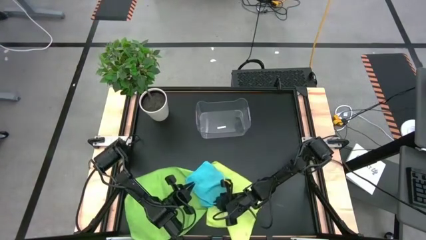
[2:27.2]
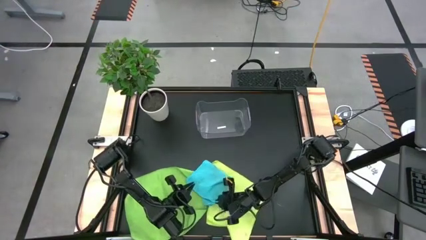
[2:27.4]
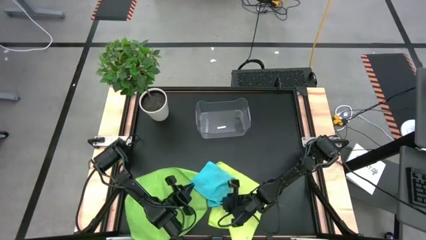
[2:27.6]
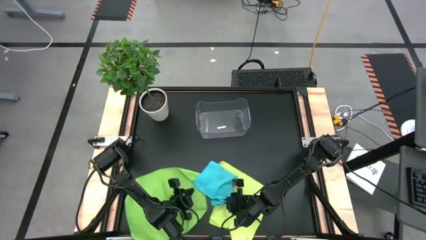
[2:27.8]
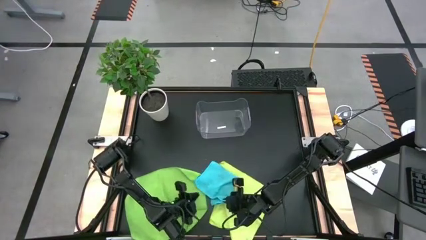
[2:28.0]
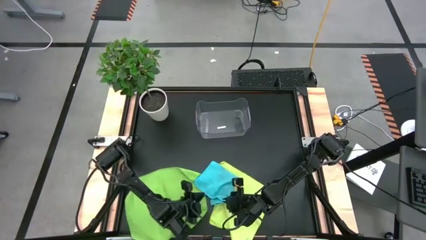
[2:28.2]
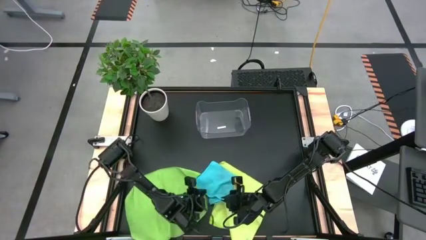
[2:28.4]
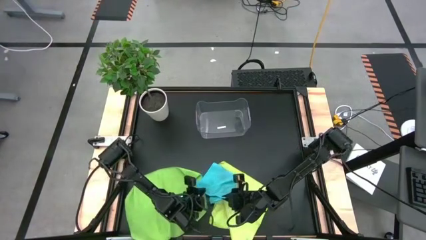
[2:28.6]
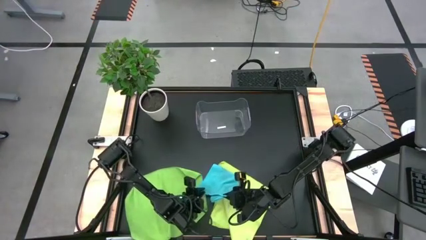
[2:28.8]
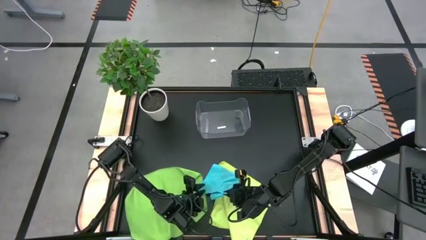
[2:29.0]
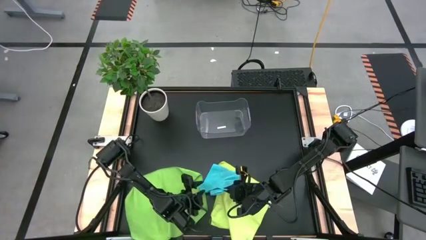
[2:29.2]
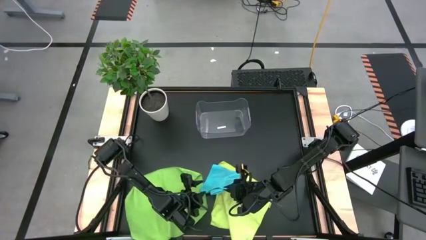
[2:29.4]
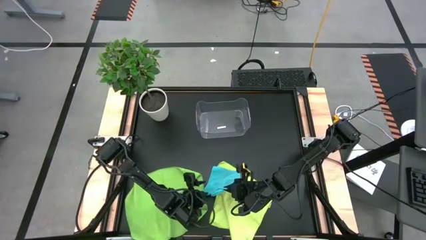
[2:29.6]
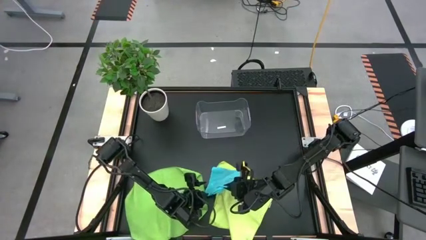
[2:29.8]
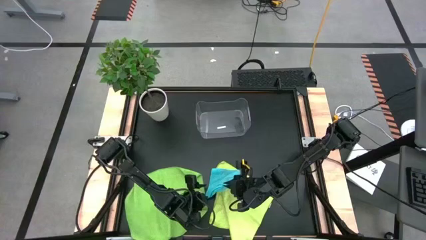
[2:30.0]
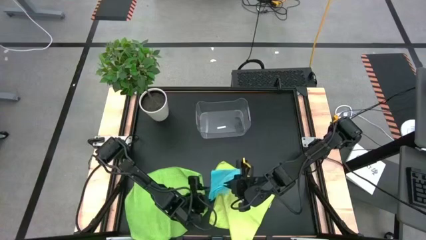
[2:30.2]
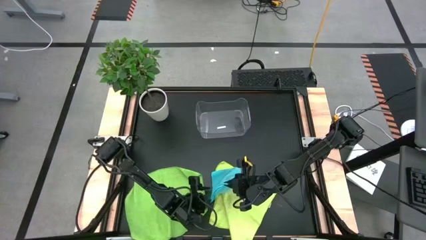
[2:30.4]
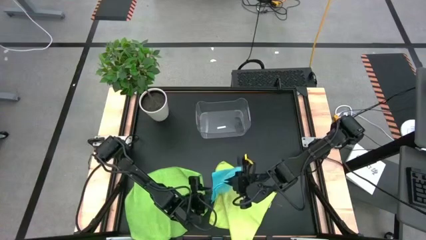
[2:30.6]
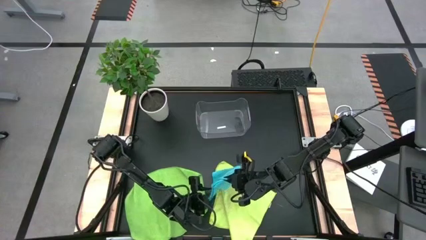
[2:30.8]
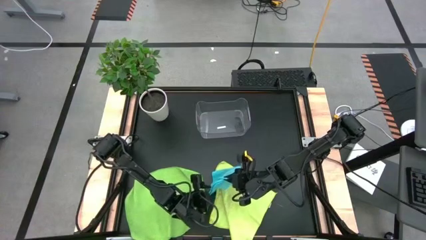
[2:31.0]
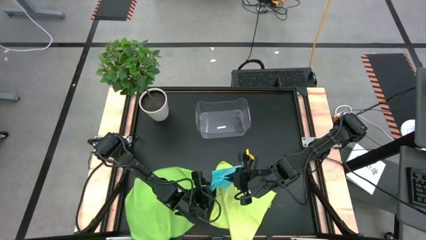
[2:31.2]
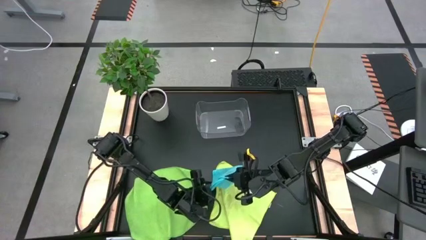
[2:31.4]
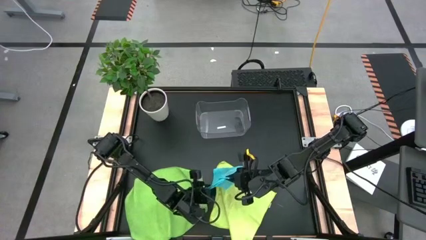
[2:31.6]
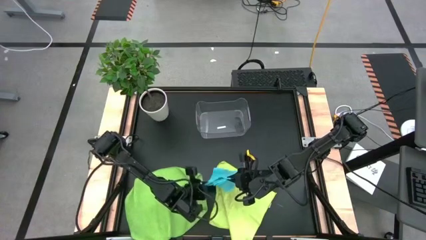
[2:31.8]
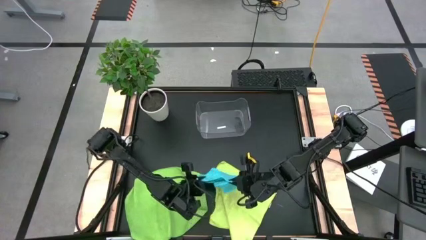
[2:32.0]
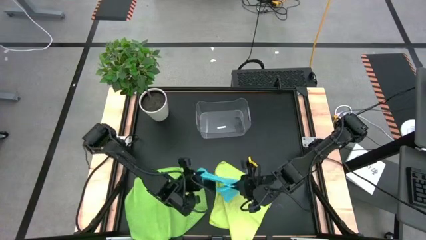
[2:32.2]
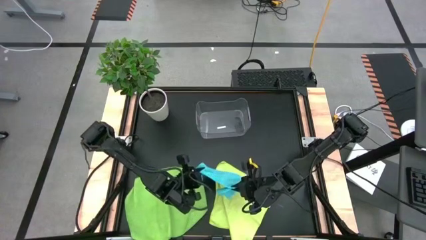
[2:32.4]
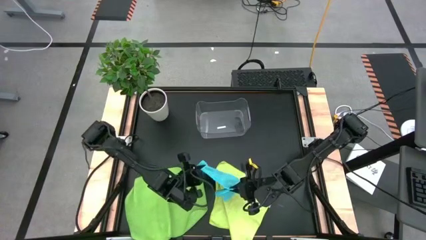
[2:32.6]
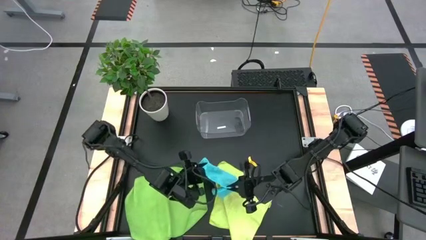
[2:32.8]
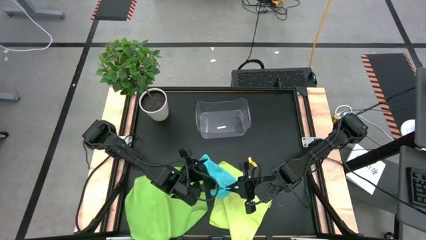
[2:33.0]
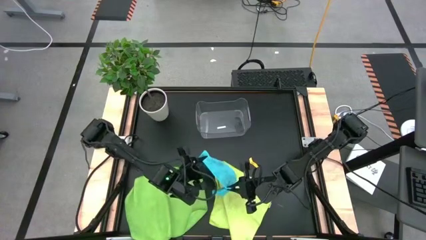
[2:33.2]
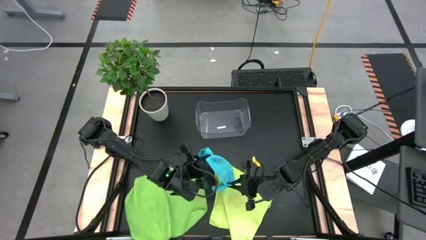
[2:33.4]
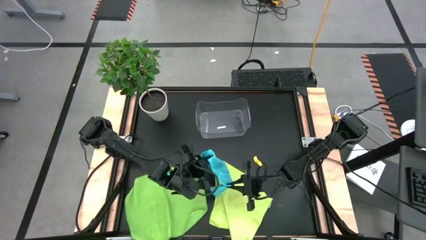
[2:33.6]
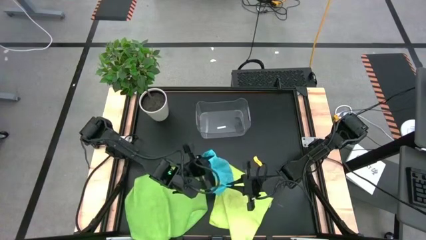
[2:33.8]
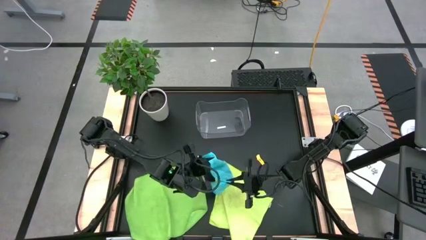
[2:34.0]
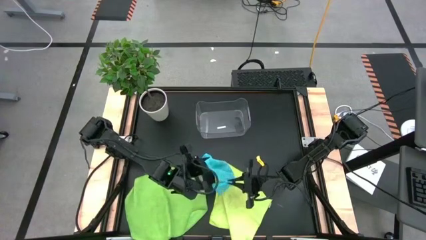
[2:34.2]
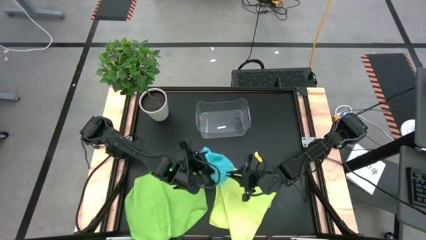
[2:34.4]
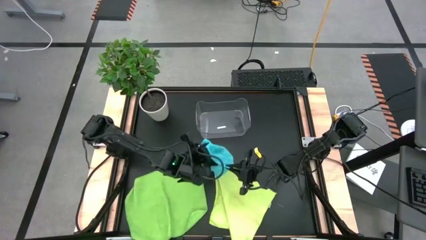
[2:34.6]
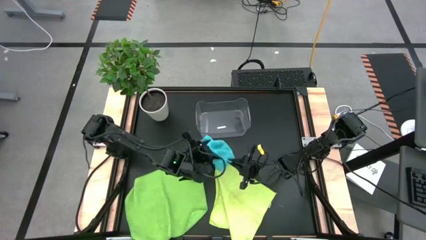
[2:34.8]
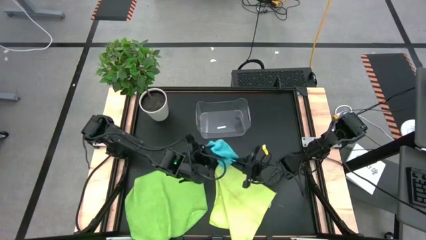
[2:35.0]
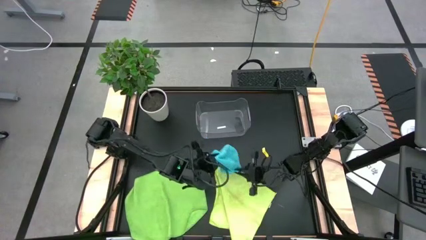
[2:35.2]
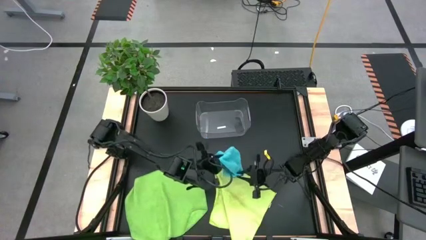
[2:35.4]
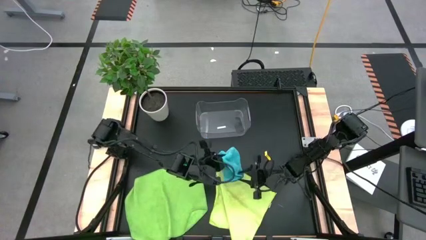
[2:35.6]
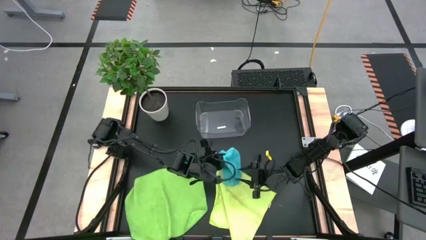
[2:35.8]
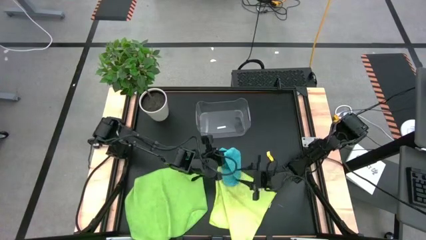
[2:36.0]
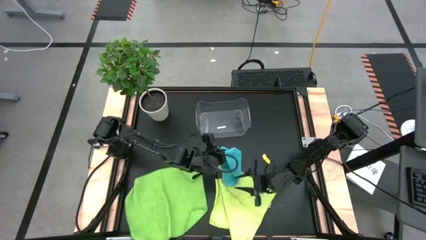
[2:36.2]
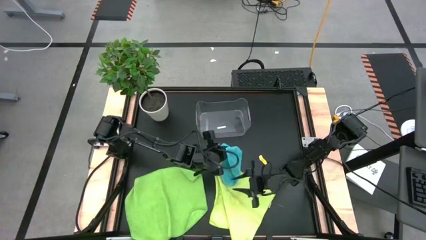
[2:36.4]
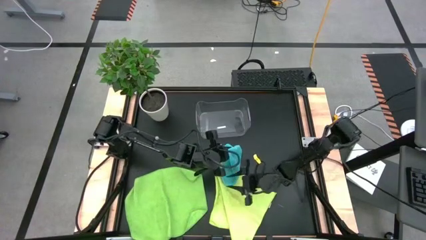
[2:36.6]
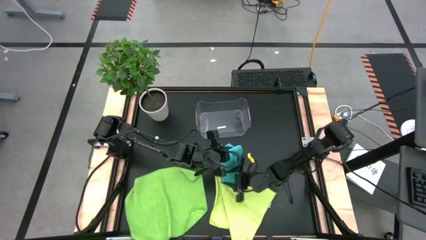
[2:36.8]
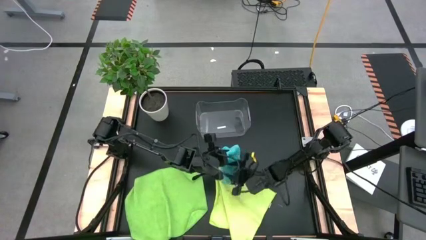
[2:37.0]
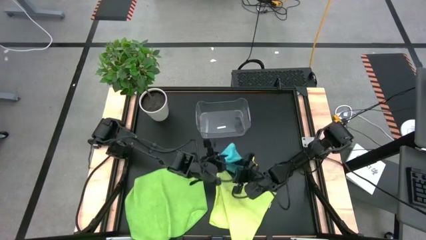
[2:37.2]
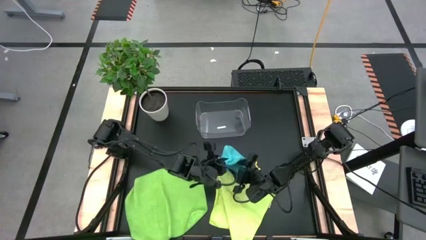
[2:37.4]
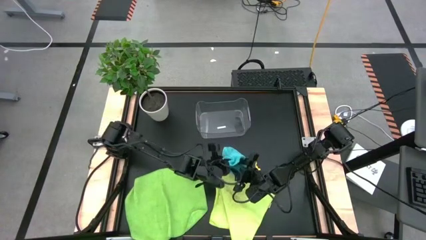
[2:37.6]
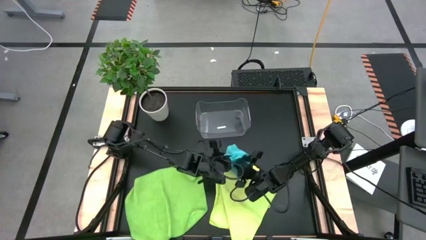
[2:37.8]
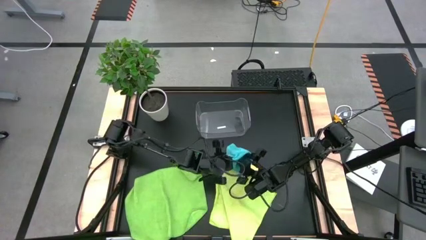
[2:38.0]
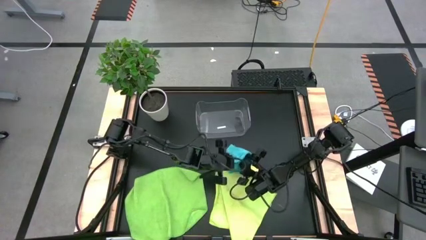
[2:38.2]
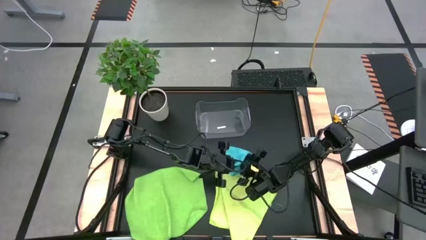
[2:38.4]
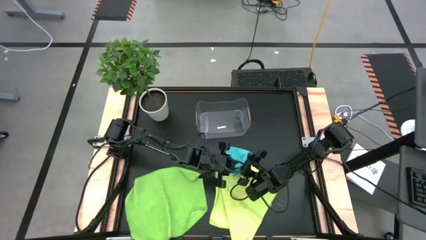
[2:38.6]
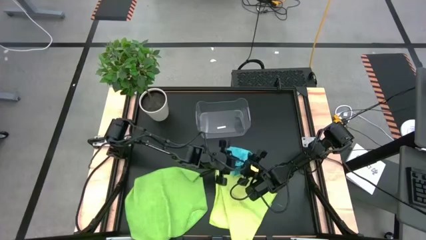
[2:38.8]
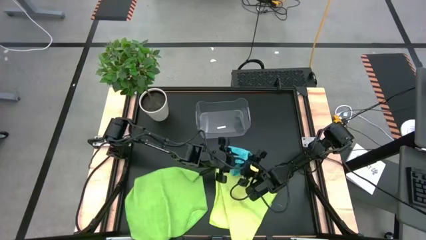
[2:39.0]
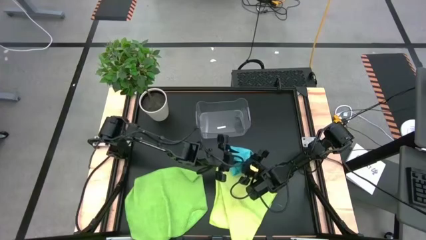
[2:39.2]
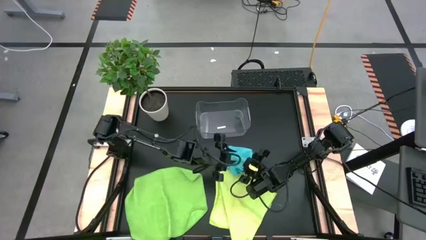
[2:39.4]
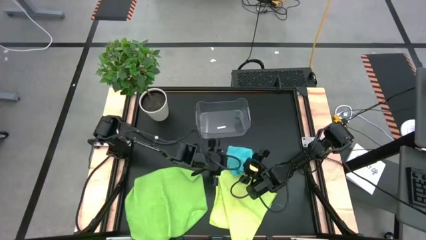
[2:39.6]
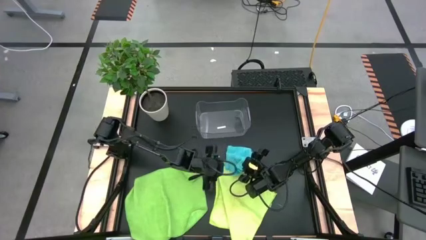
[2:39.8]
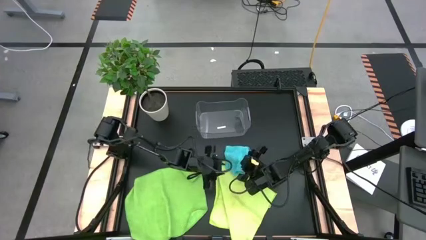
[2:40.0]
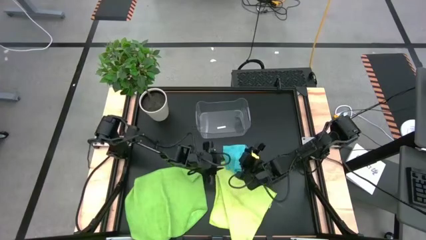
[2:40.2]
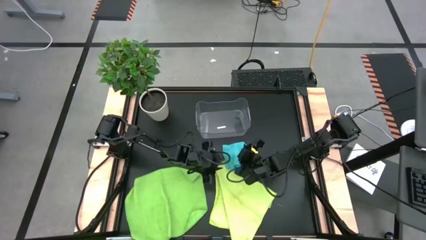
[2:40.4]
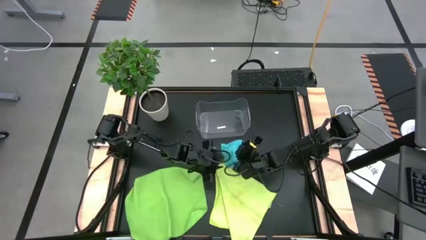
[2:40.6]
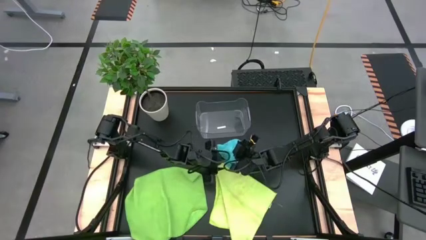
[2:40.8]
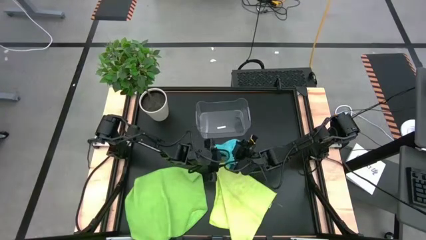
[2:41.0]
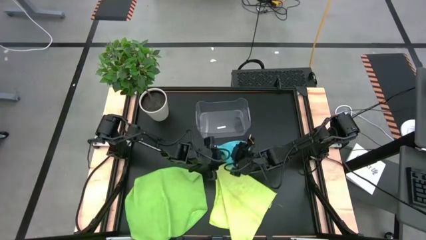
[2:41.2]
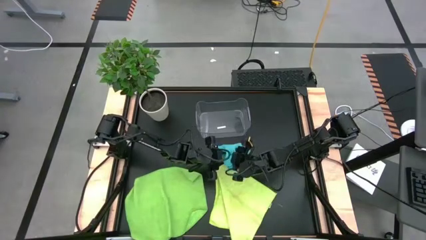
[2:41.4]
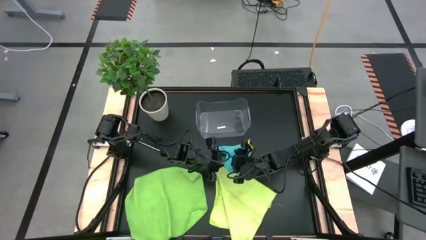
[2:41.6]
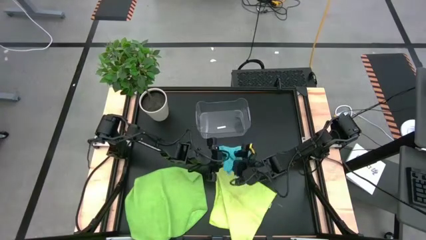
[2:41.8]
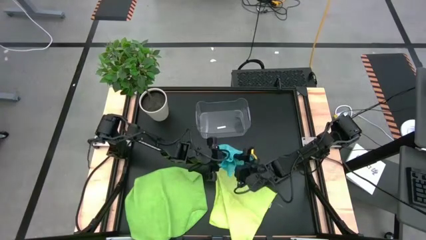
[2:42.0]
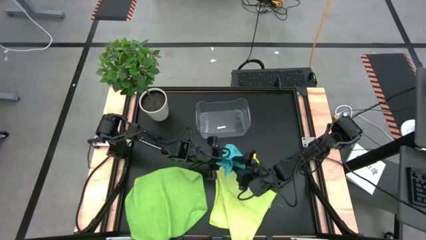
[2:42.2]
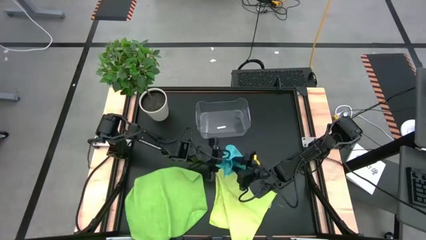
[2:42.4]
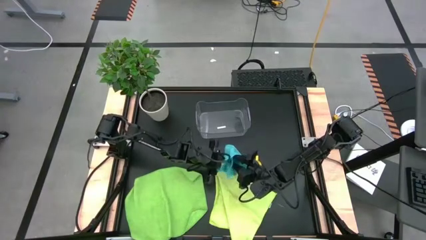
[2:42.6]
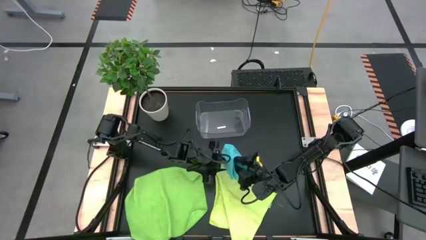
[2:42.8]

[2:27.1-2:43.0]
Task: Fold microfiber towels
Fold the blue towel

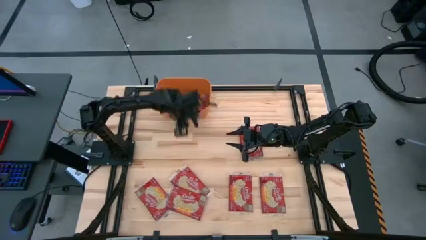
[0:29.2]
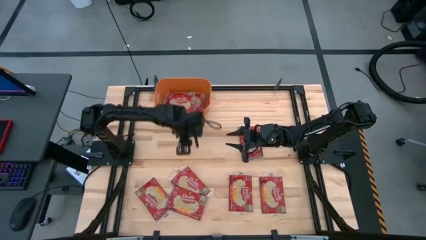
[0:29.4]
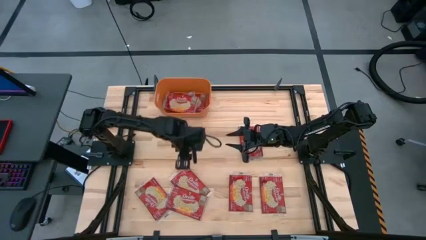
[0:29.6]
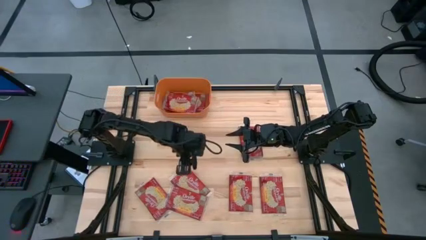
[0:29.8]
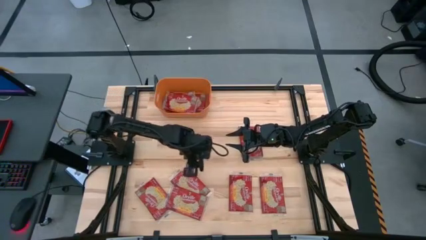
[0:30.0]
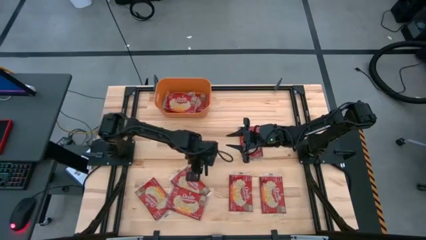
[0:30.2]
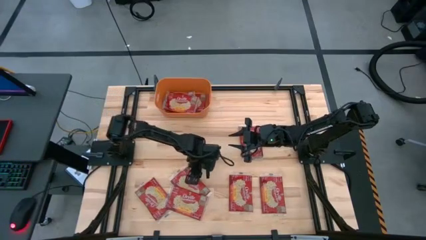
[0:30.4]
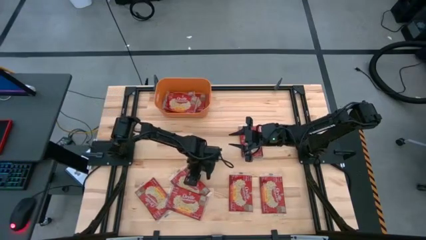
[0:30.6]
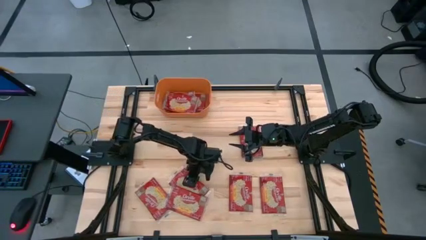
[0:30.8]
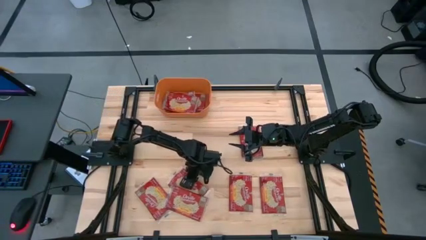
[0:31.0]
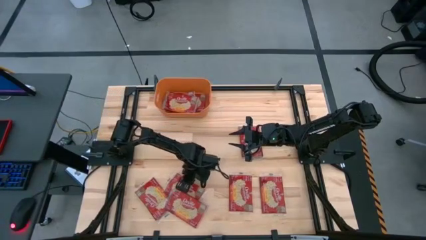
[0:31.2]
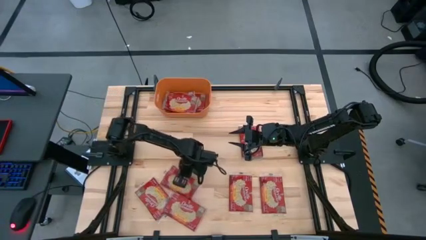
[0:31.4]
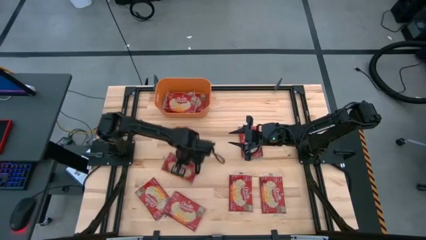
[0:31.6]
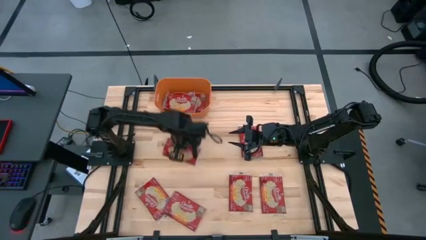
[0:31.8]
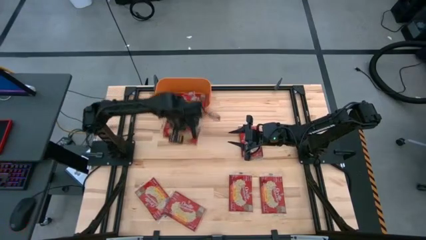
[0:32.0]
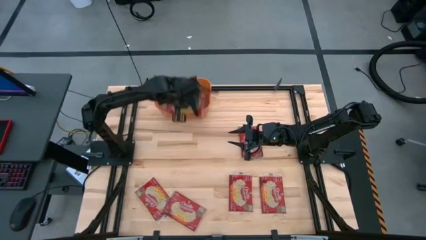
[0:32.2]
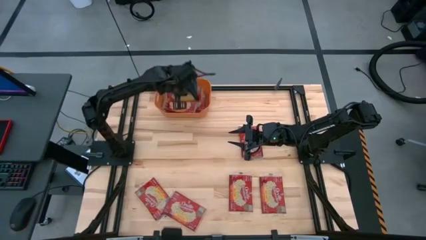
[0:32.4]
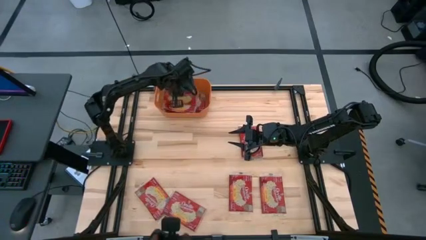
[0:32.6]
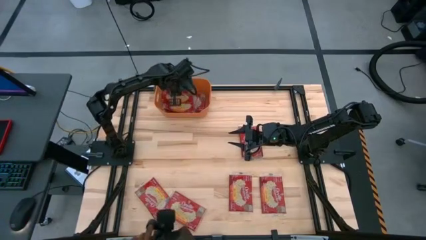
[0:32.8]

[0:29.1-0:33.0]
Task: Sort popcorn bags into baskets
Put the popcorn bag into the orange bin
